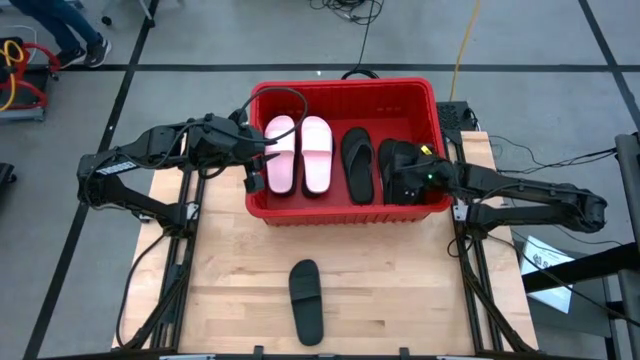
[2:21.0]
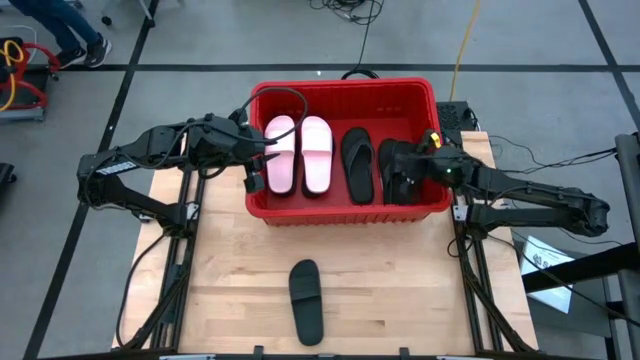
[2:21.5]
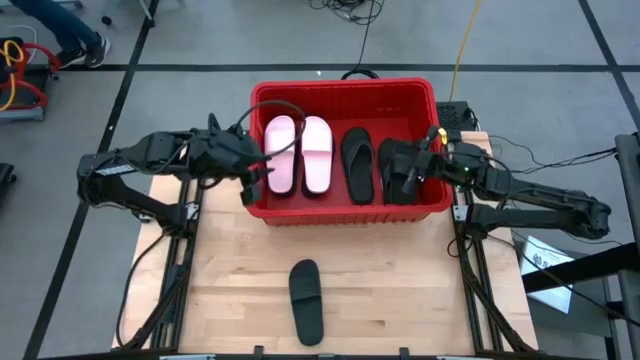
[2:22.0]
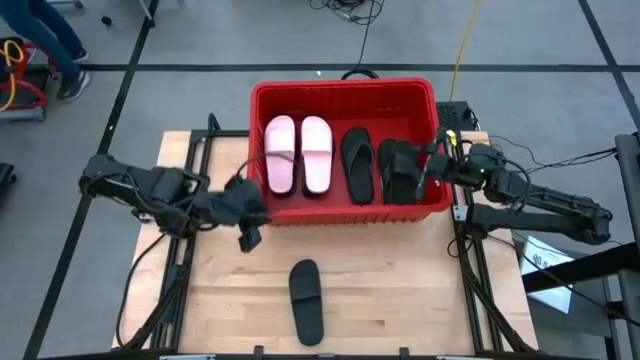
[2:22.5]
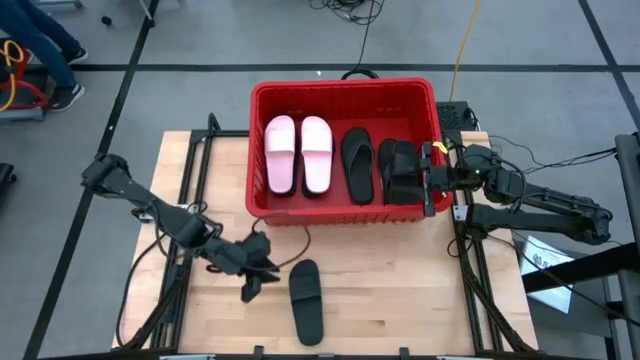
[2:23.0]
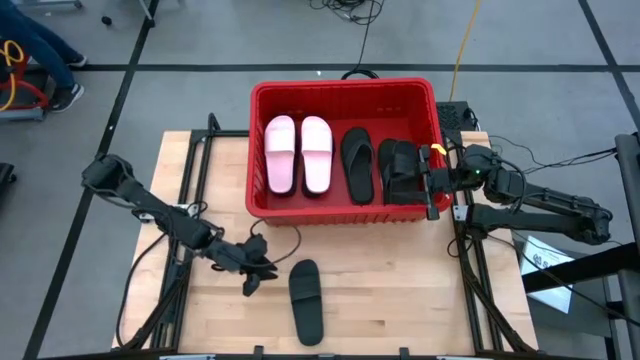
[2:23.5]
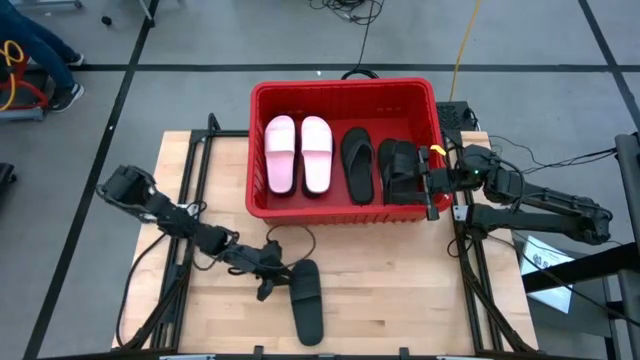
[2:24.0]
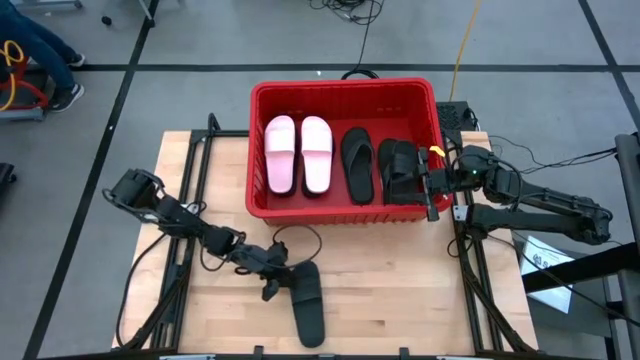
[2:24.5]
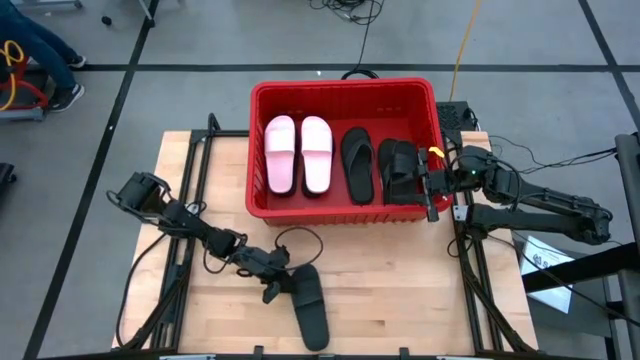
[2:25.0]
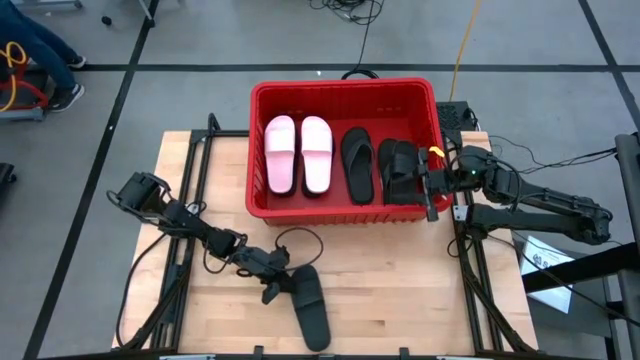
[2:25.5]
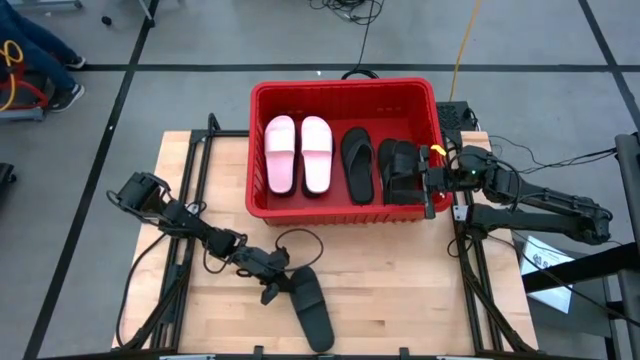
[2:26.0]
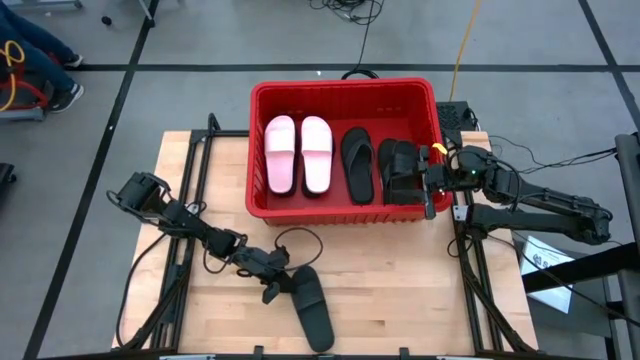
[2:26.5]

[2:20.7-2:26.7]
Task: Pick and place slides into bin
Put the black slide into the red container

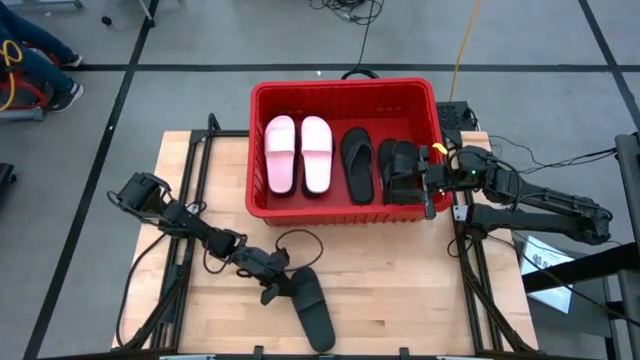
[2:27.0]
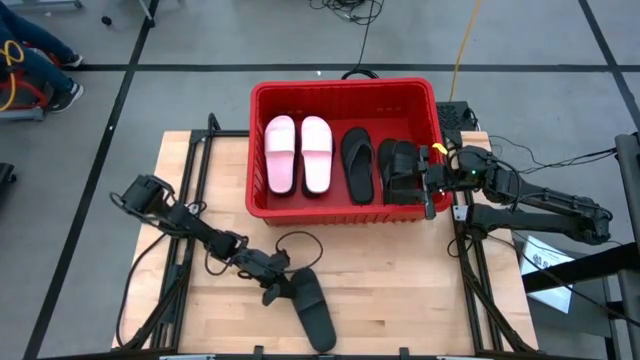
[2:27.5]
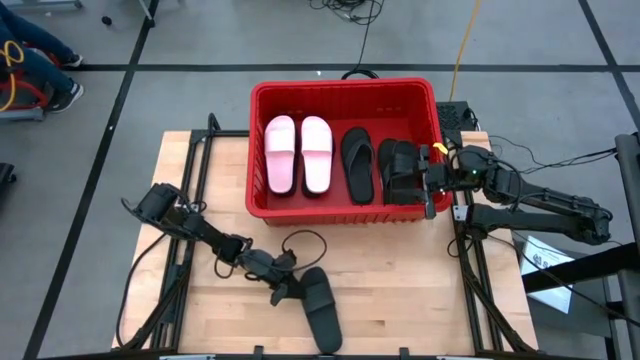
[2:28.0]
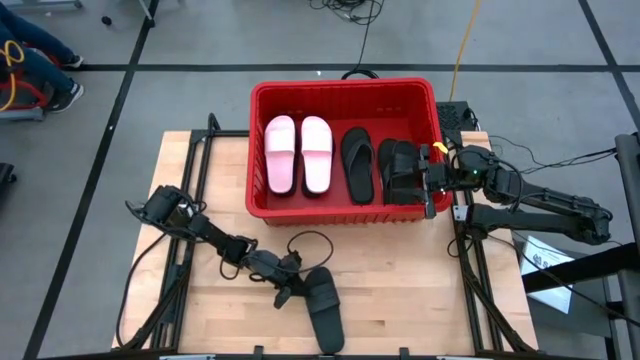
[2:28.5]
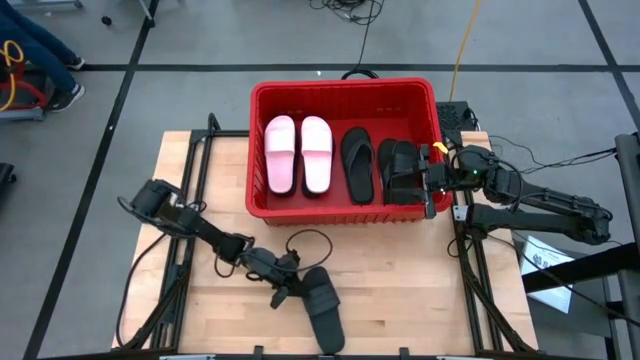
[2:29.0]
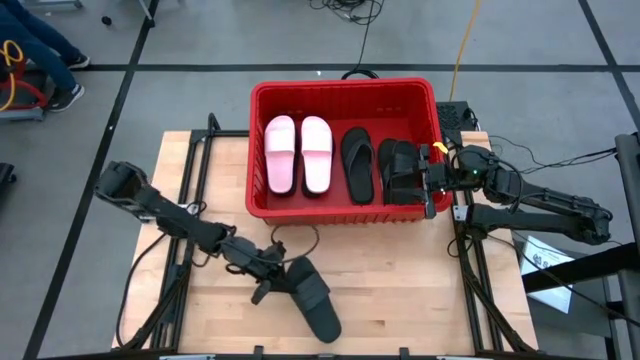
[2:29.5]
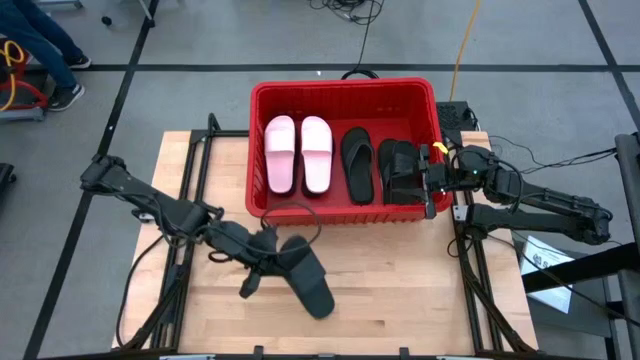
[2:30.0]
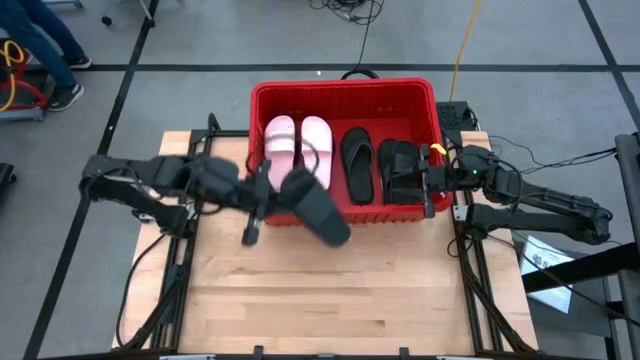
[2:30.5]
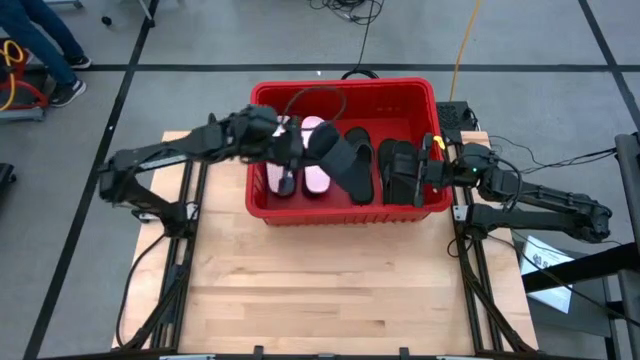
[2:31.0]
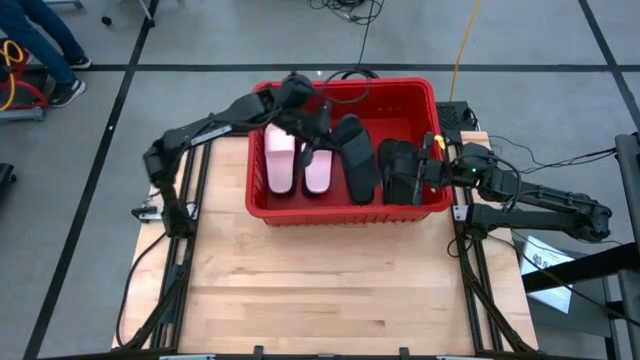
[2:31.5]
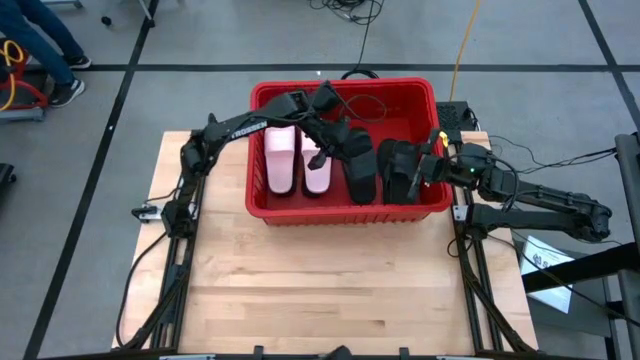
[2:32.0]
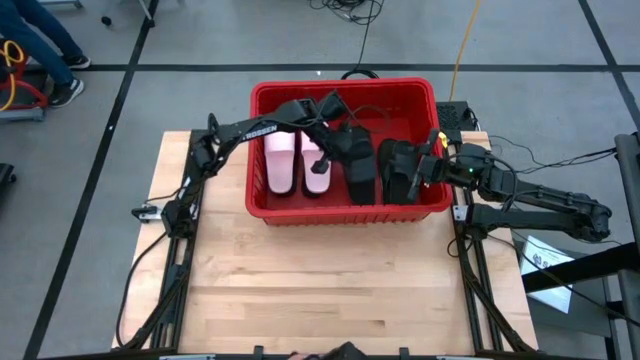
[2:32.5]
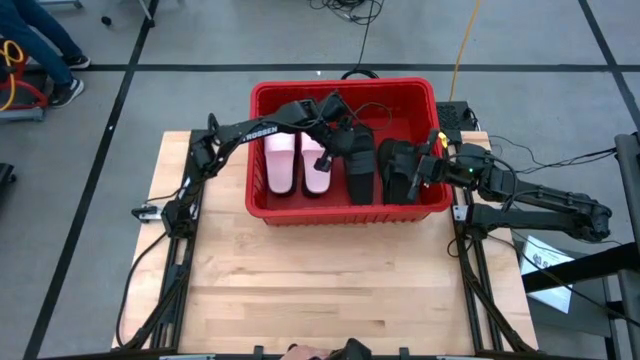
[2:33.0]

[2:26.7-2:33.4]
Put the black slide into the red container

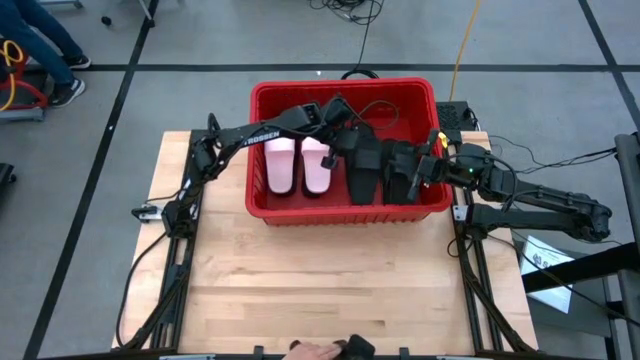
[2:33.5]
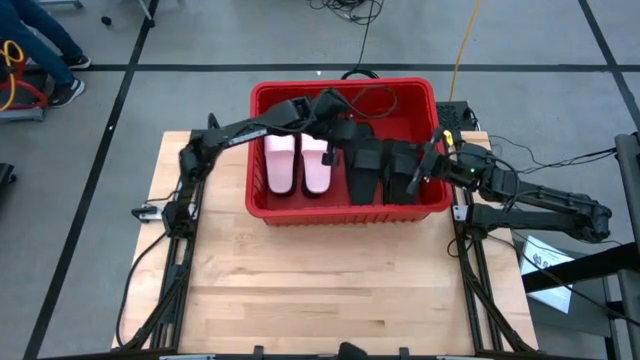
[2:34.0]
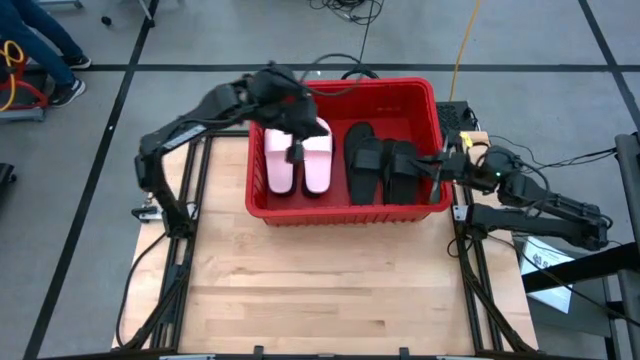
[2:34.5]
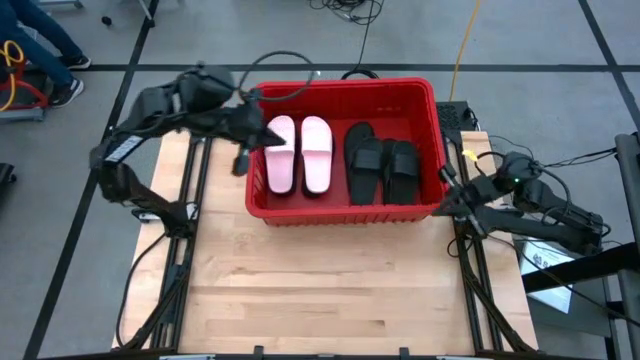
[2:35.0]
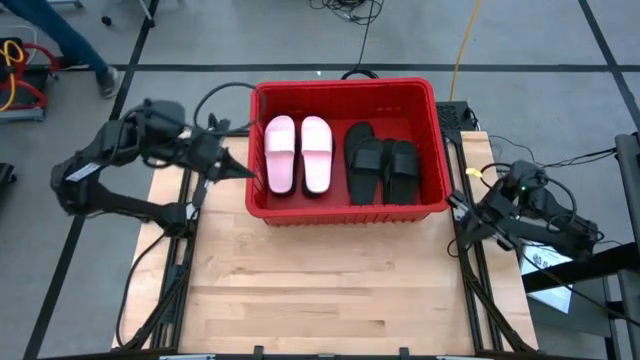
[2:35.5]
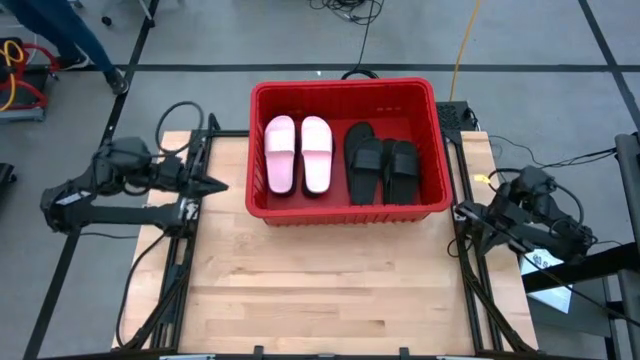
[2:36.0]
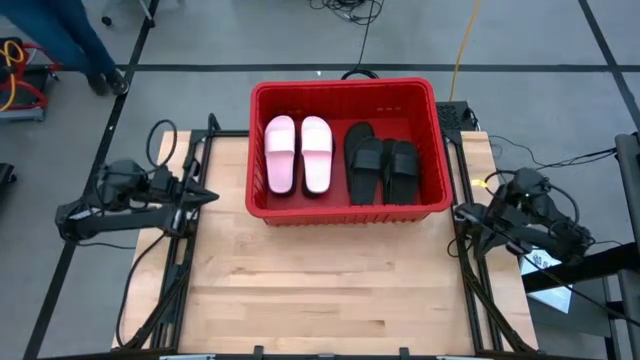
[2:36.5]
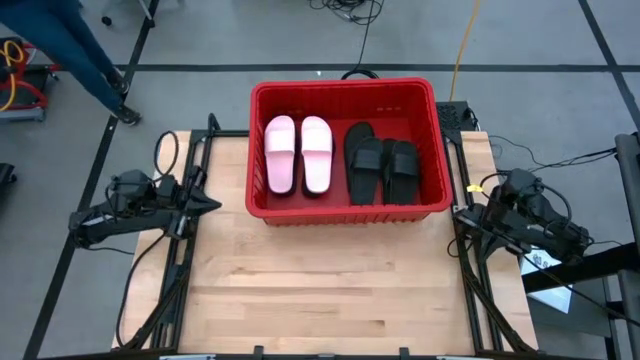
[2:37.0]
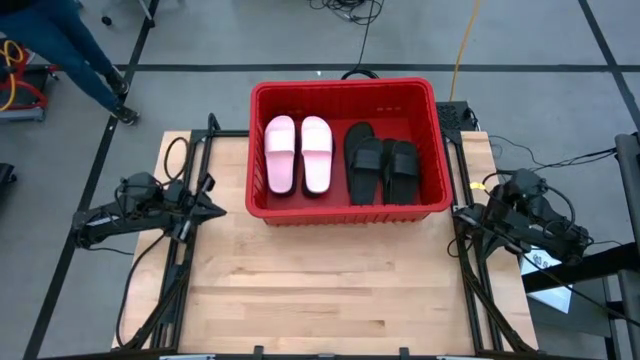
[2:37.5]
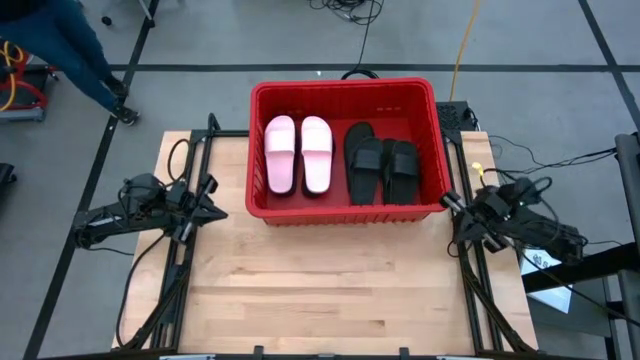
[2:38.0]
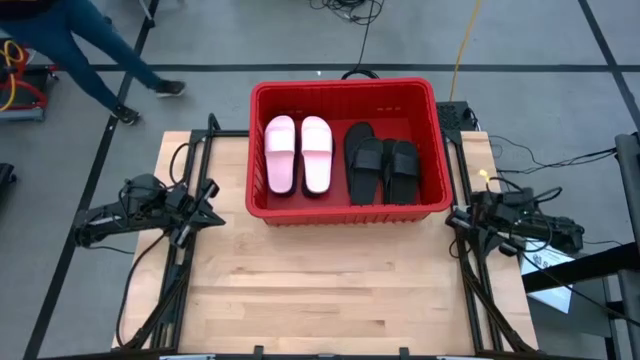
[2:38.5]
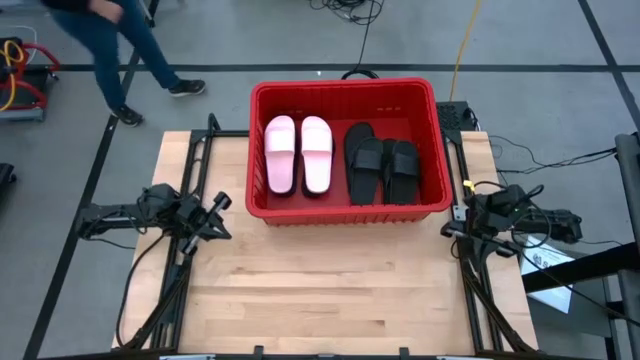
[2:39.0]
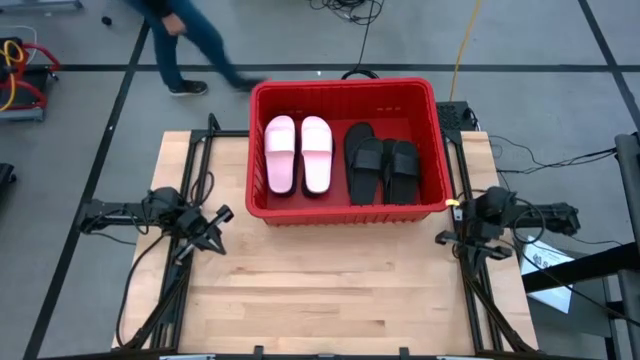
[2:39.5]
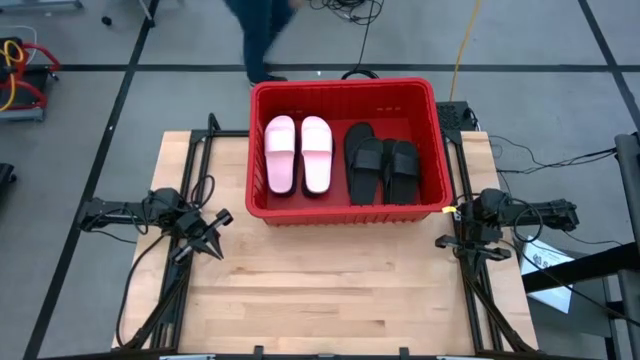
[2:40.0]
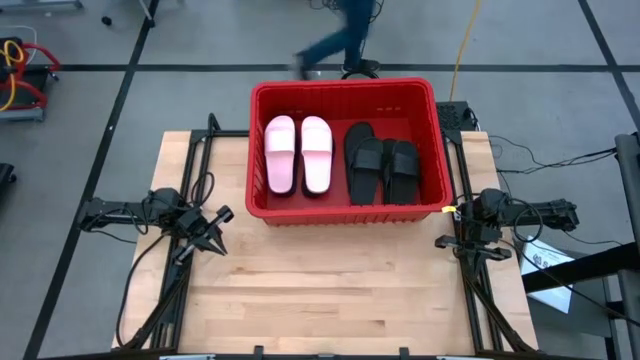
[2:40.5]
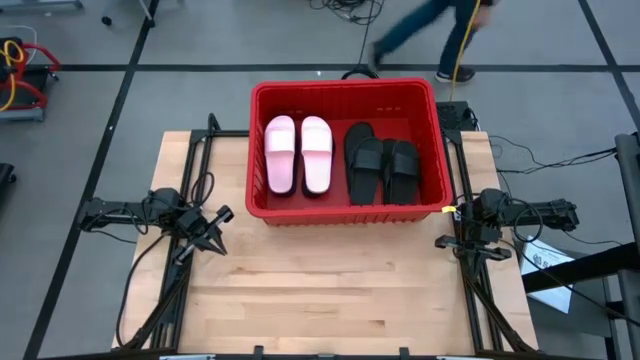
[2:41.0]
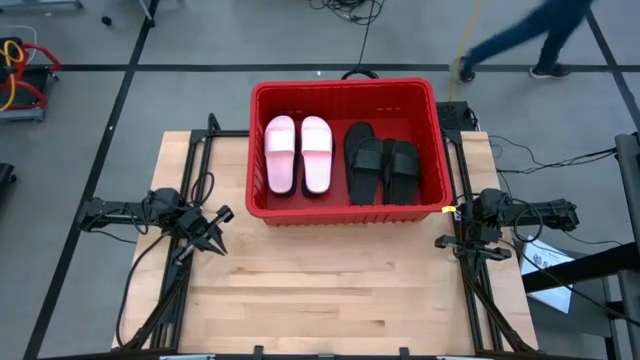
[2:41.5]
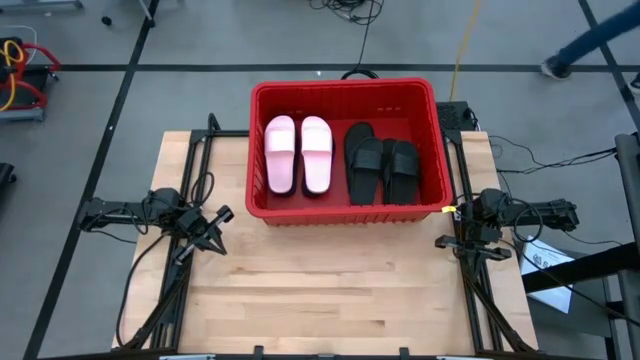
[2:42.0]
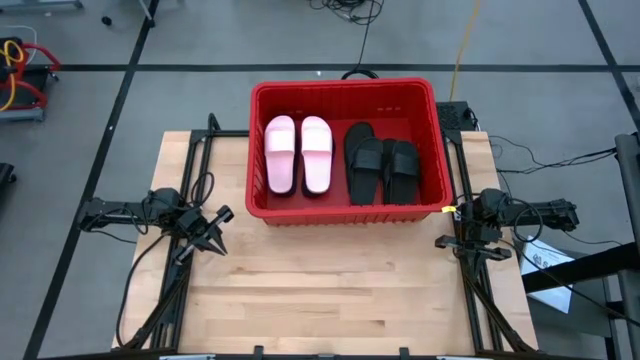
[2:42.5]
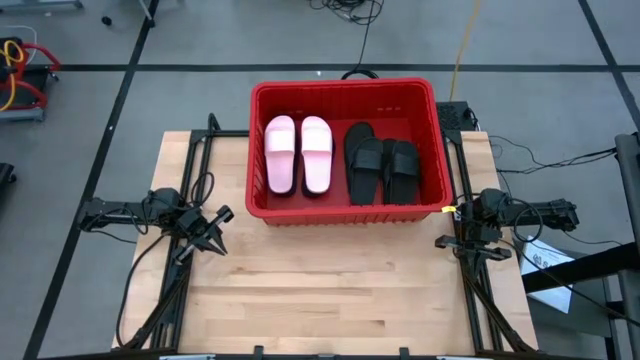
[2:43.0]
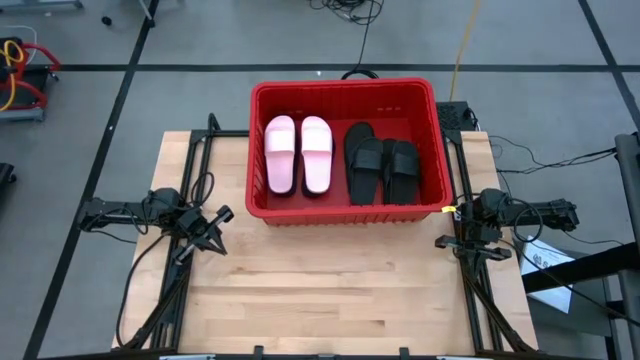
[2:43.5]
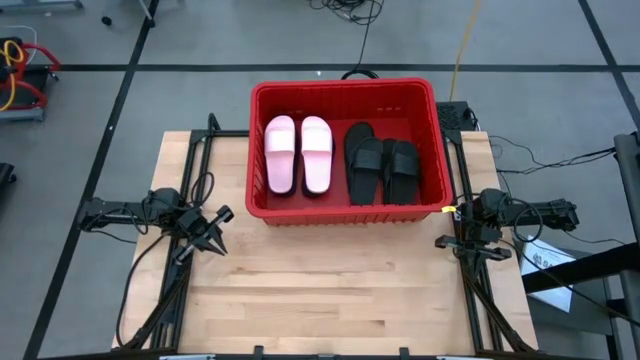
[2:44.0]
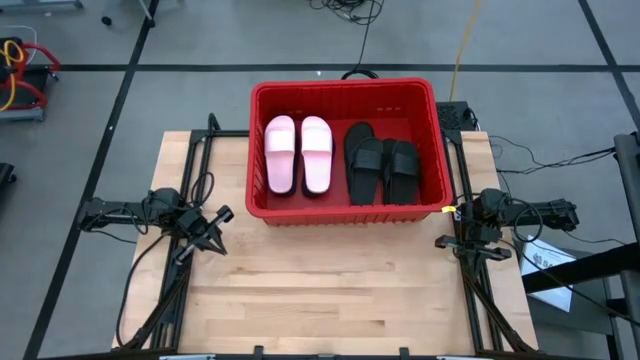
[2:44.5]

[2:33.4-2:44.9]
Return to Home Position
